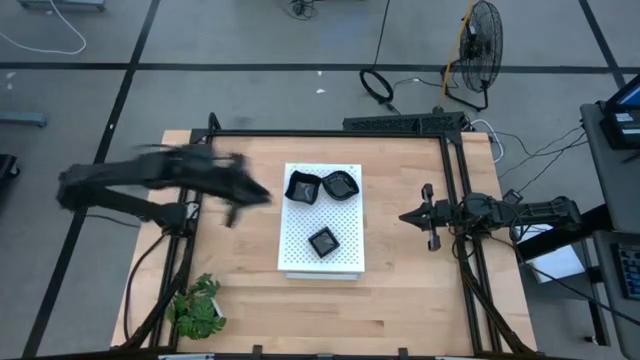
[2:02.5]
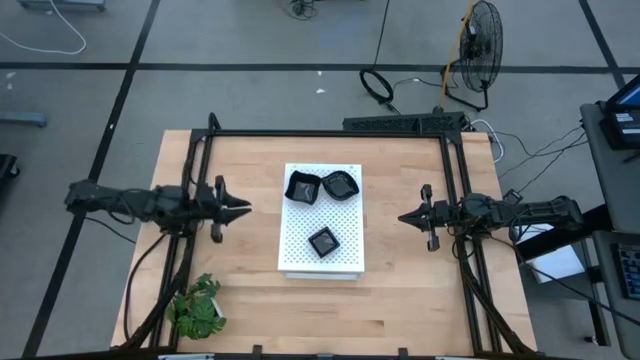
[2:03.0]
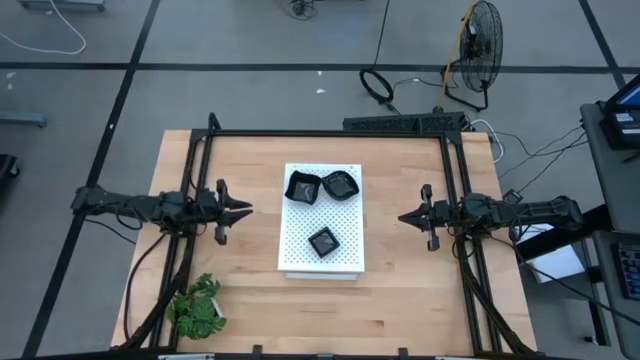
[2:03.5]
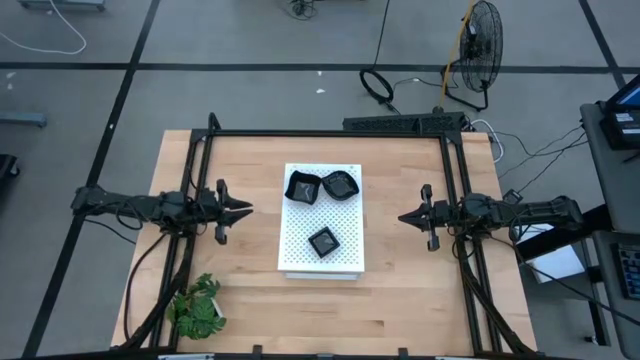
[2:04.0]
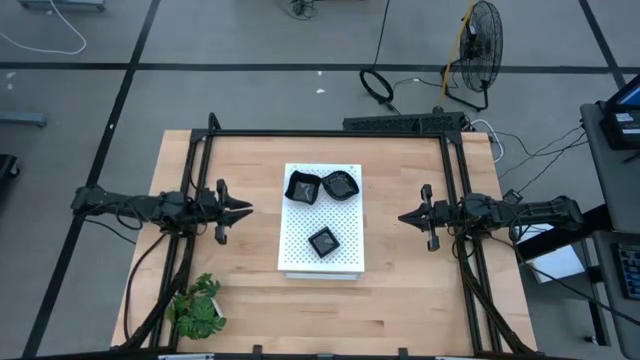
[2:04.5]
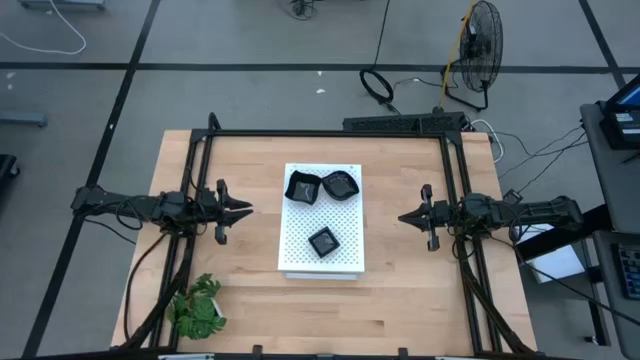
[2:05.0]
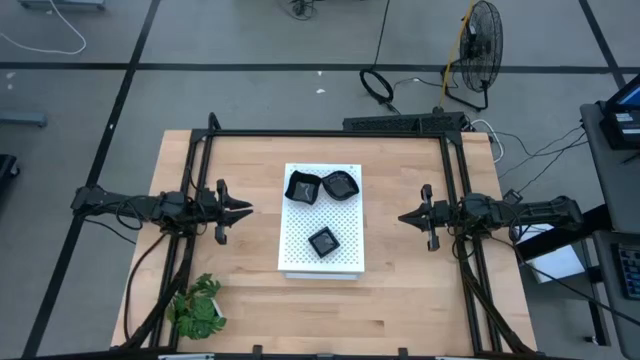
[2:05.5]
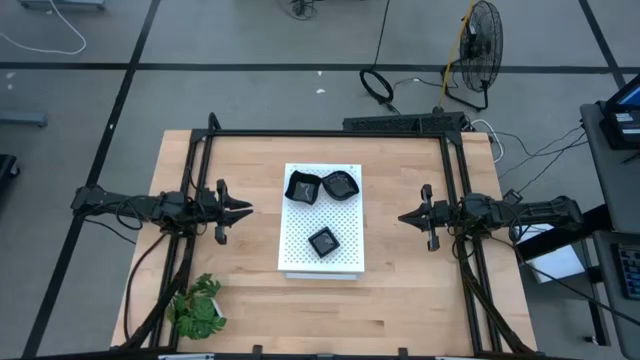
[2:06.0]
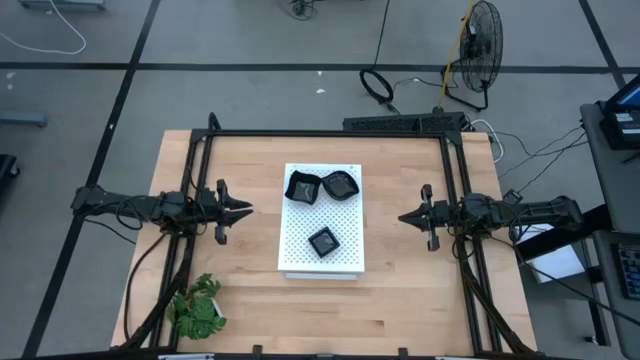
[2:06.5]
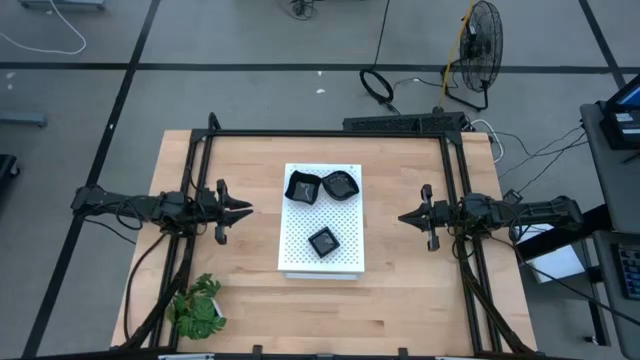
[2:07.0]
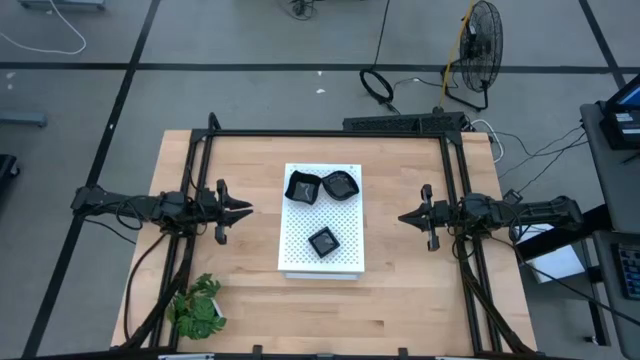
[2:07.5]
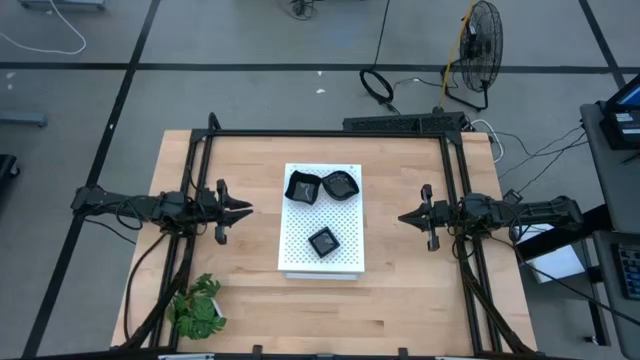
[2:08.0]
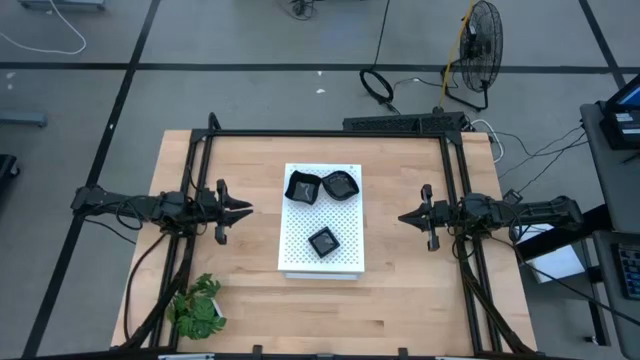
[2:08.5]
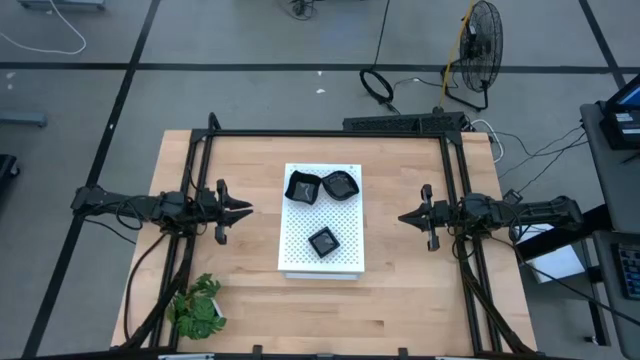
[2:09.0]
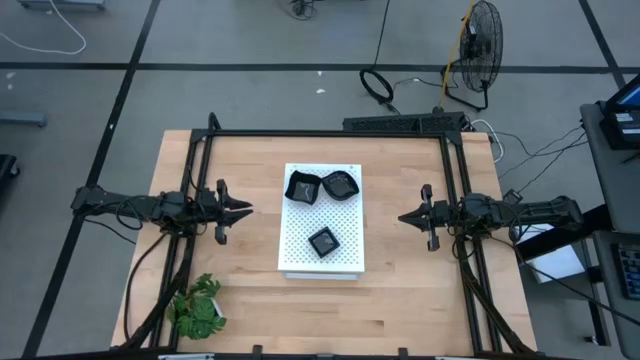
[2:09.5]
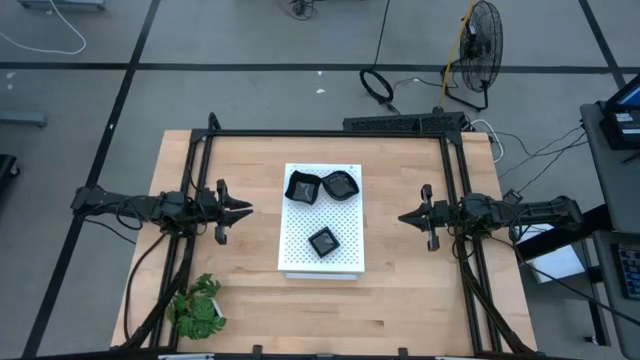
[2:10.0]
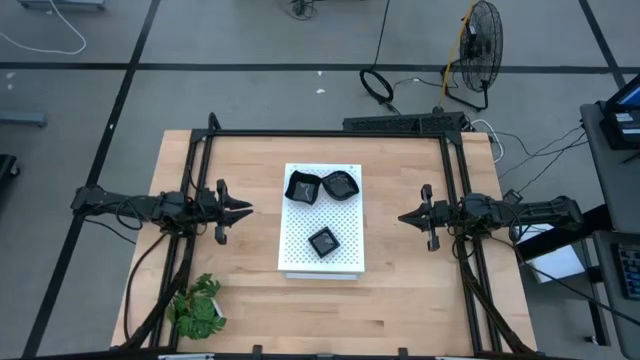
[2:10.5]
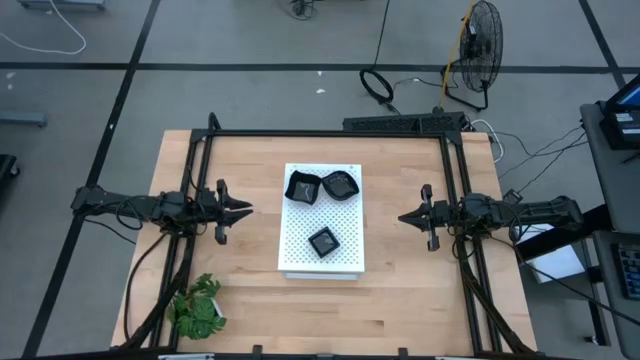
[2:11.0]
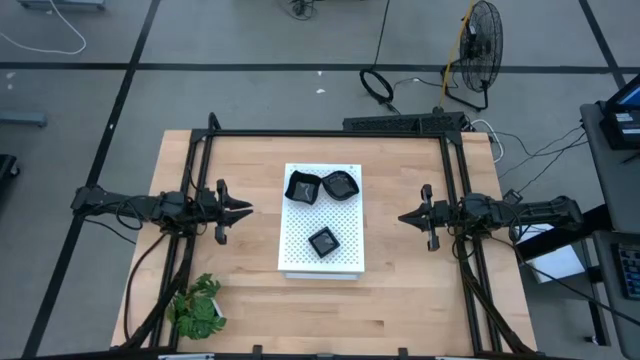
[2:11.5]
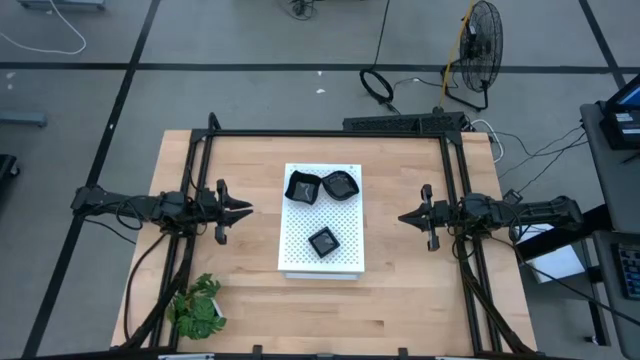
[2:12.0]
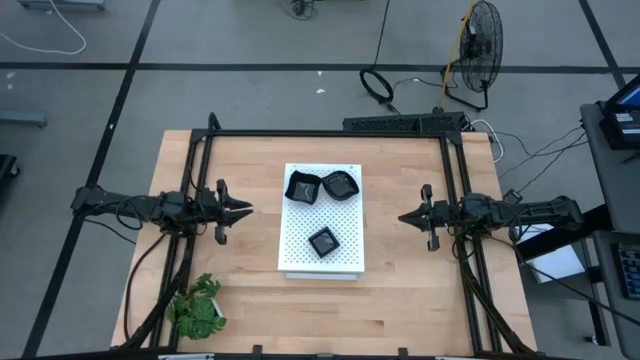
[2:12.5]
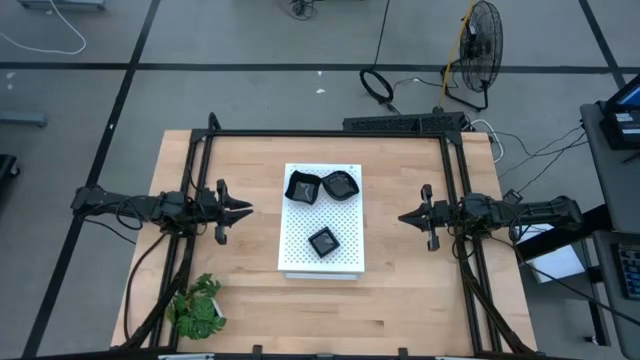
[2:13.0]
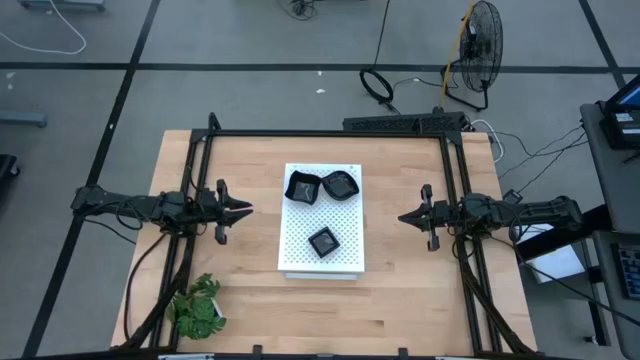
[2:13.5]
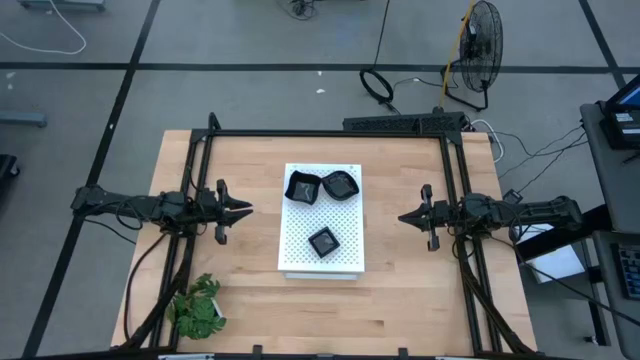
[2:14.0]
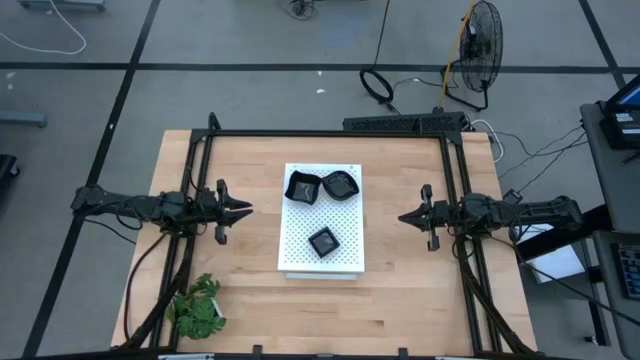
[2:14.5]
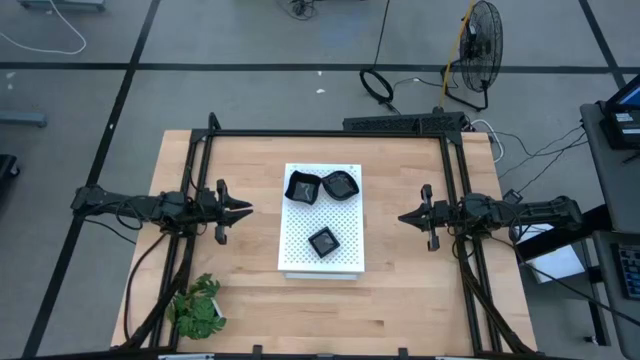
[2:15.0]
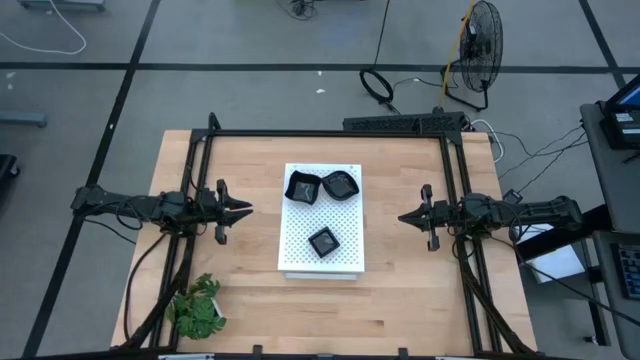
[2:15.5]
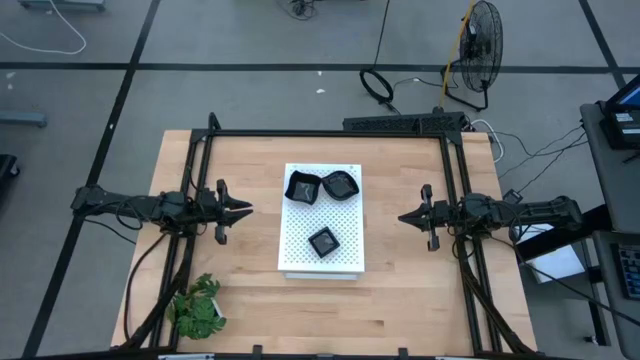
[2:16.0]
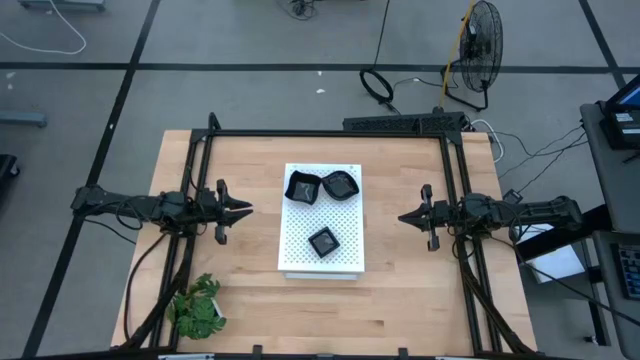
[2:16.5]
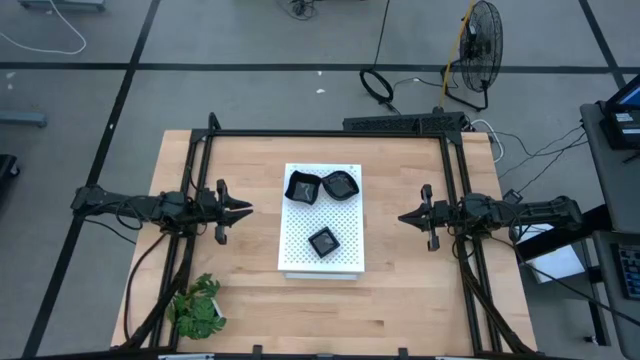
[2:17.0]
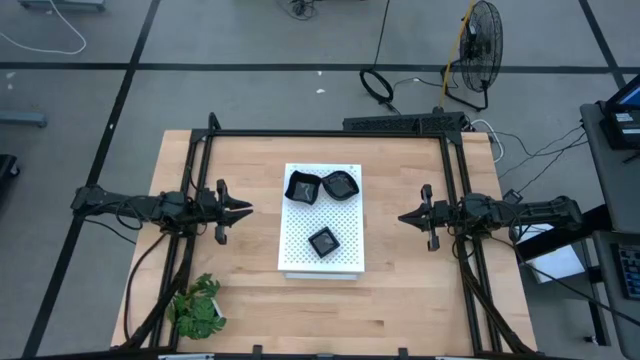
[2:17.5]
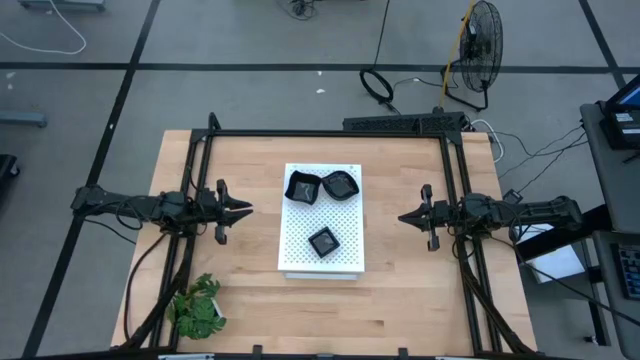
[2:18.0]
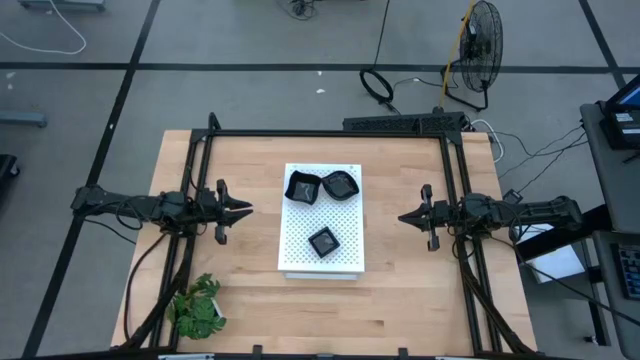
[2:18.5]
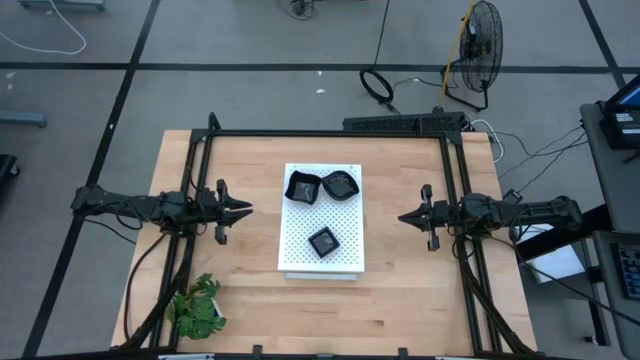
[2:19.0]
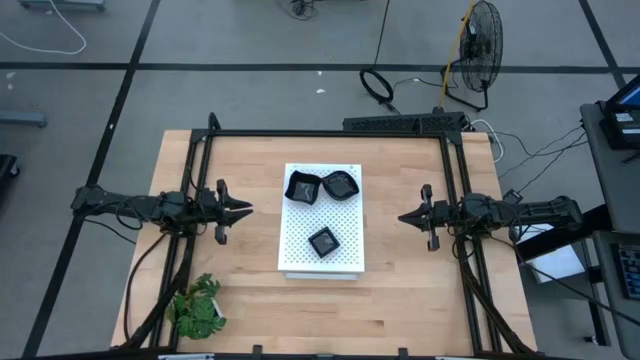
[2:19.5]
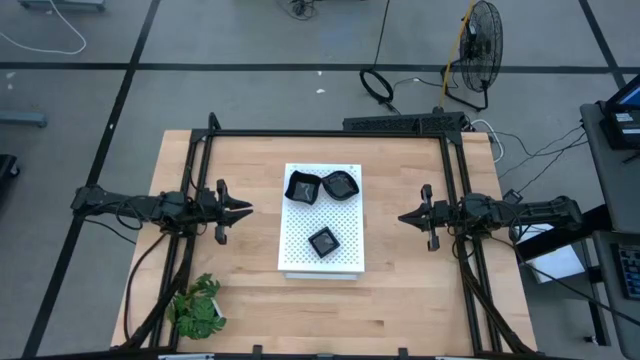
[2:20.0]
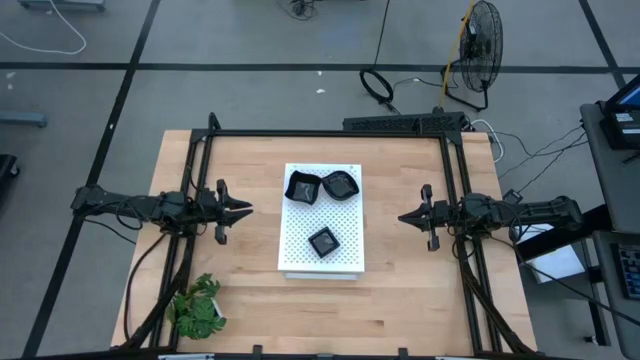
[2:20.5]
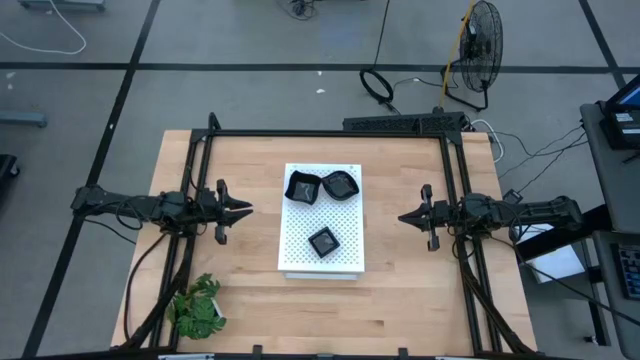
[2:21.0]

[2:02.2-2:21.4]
Task: Pick & Place Mini shaped plates
Return to Home Position
